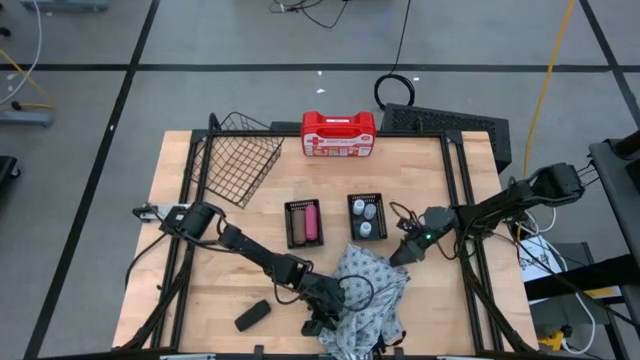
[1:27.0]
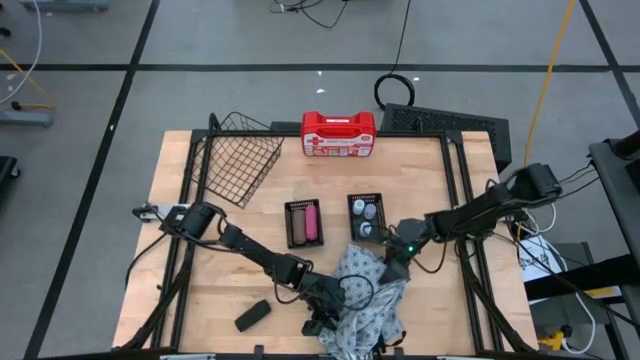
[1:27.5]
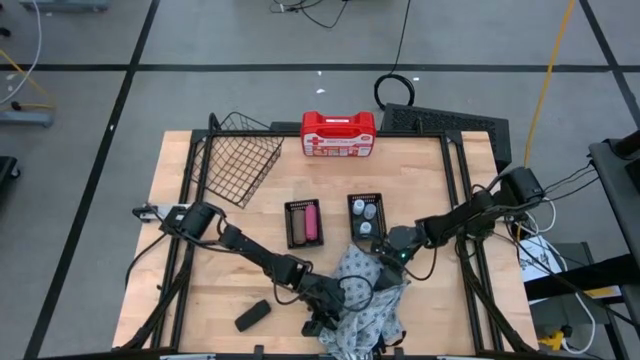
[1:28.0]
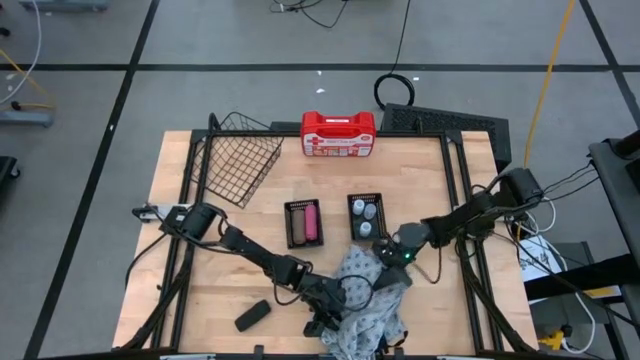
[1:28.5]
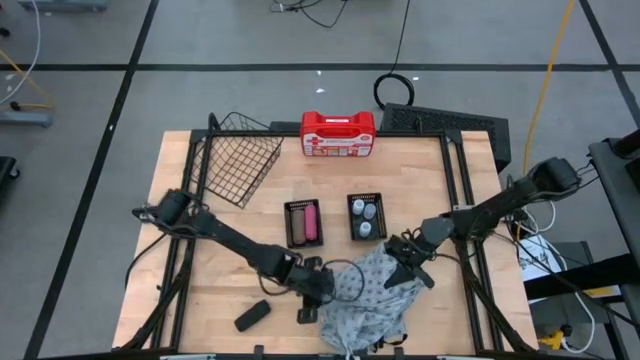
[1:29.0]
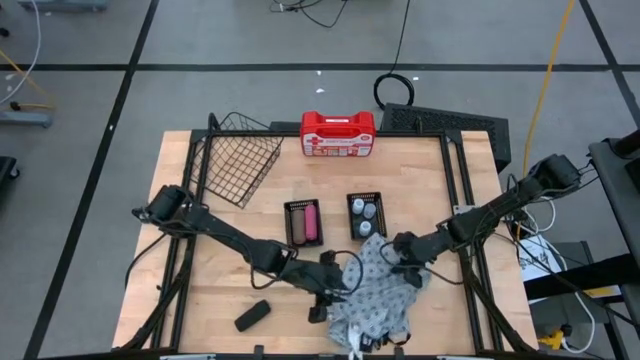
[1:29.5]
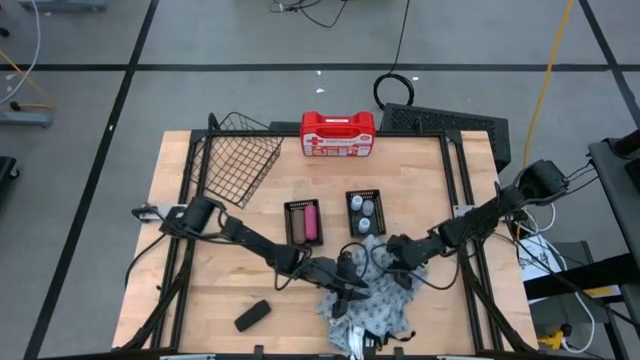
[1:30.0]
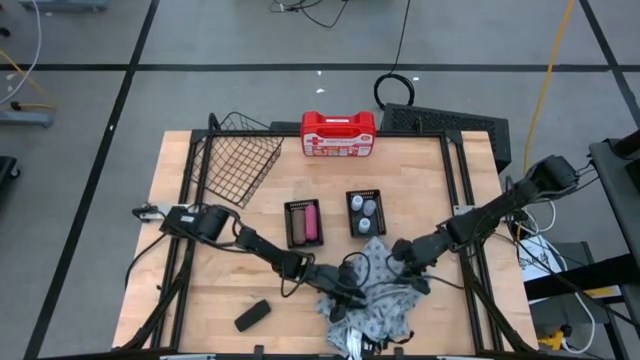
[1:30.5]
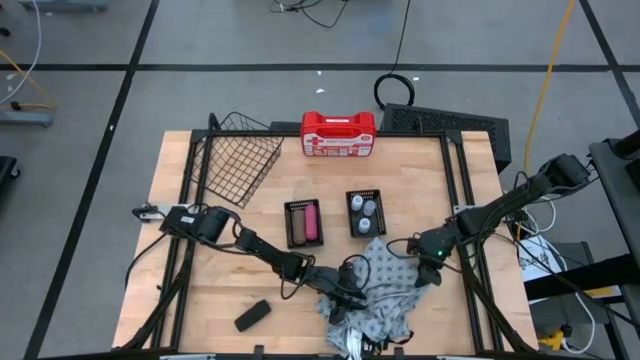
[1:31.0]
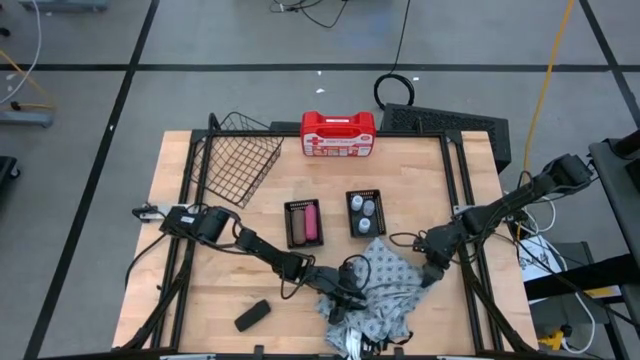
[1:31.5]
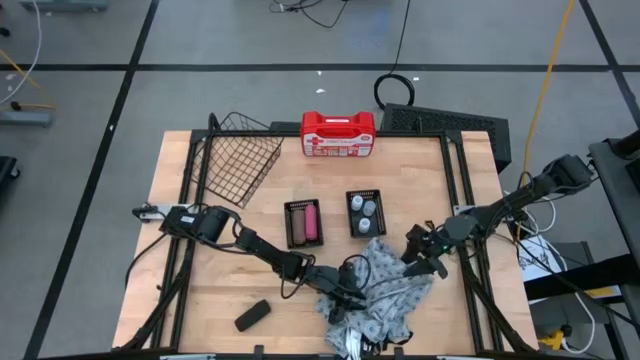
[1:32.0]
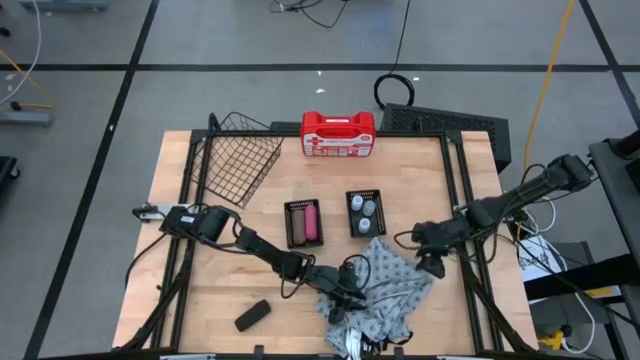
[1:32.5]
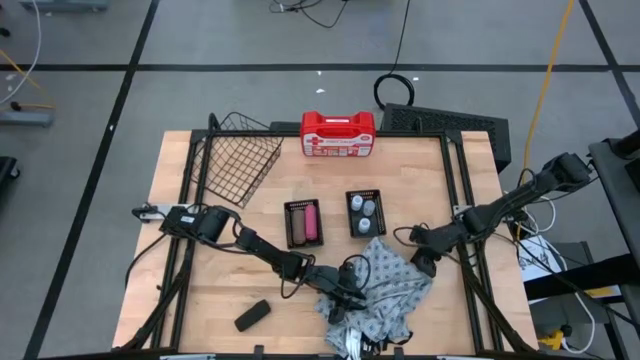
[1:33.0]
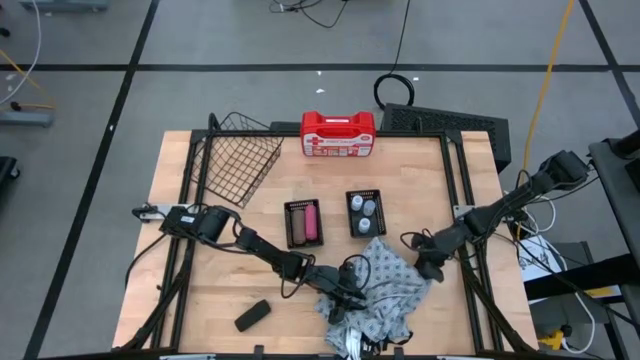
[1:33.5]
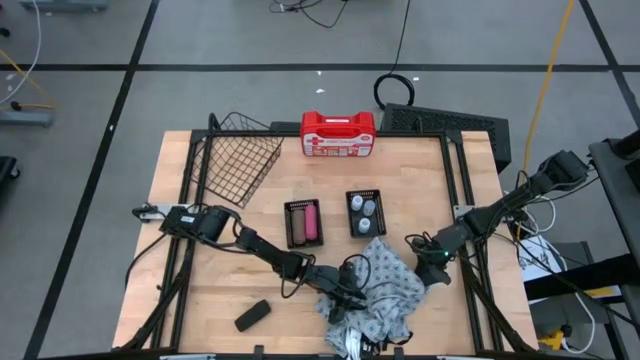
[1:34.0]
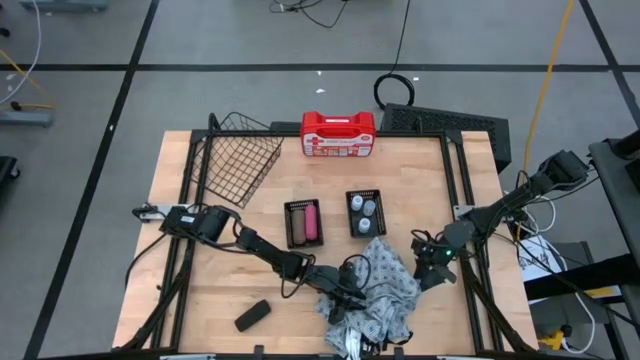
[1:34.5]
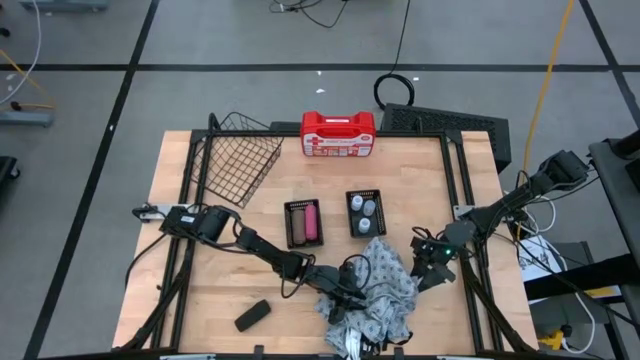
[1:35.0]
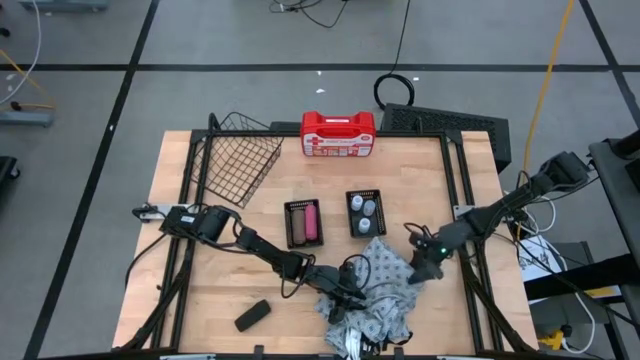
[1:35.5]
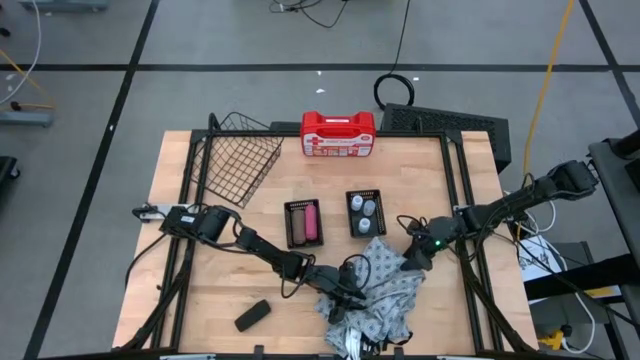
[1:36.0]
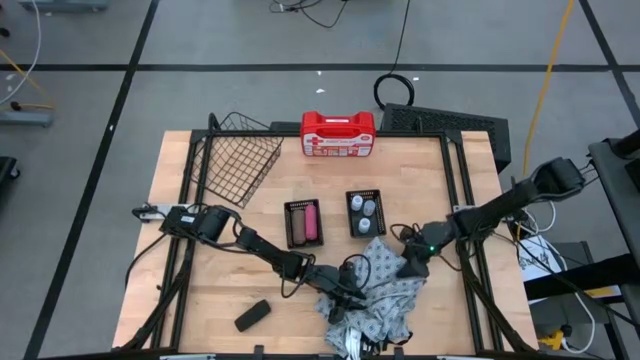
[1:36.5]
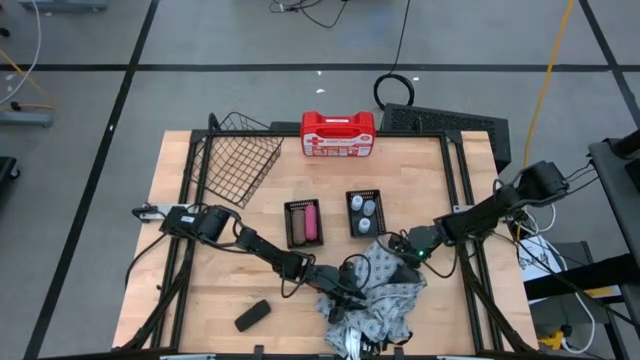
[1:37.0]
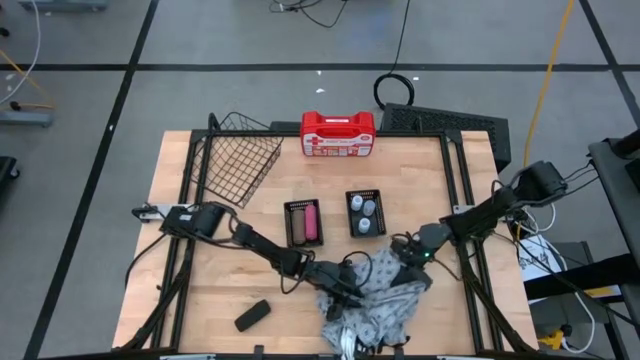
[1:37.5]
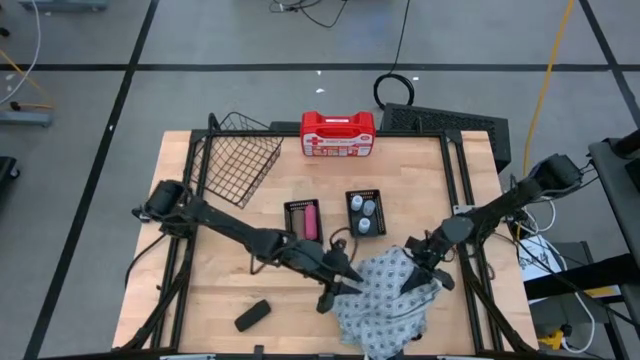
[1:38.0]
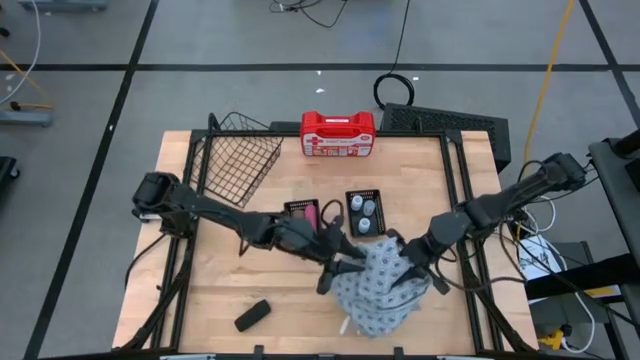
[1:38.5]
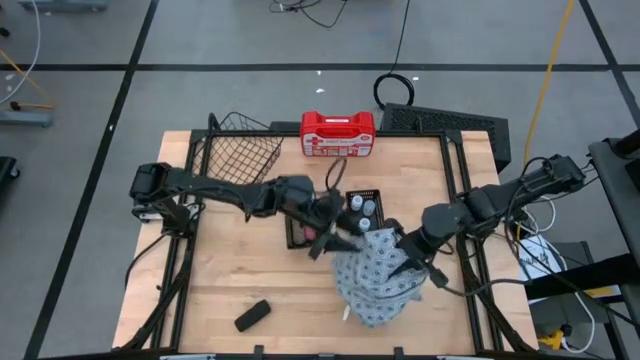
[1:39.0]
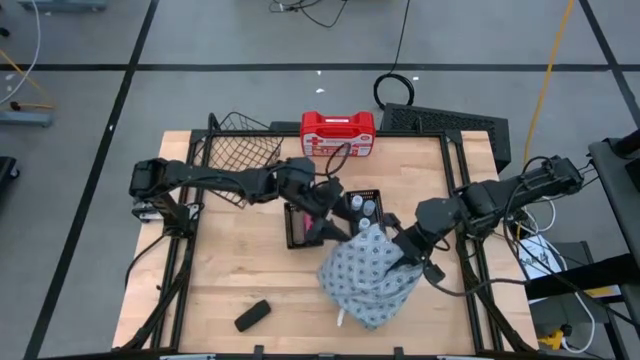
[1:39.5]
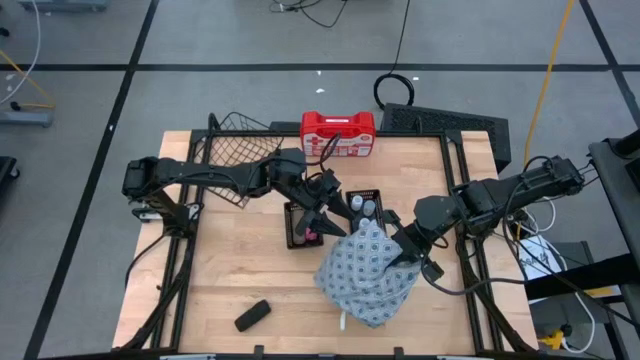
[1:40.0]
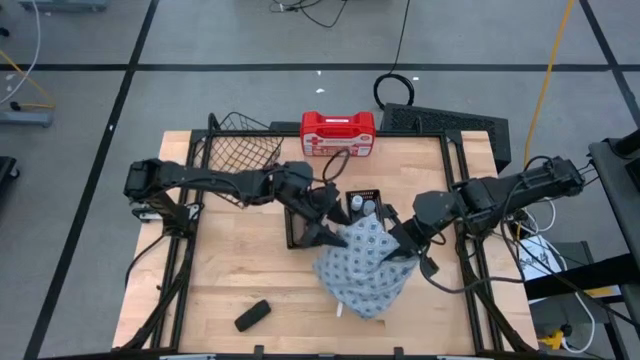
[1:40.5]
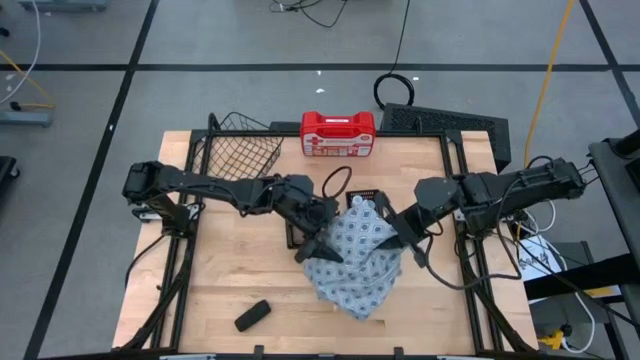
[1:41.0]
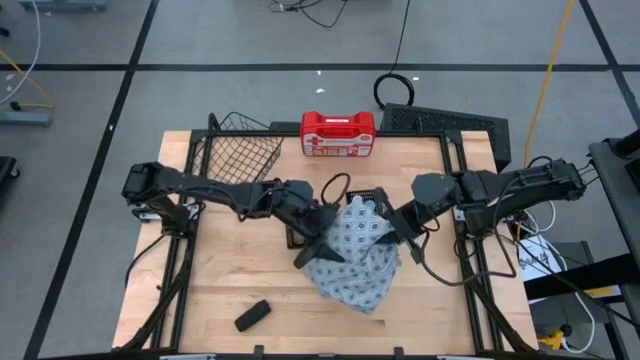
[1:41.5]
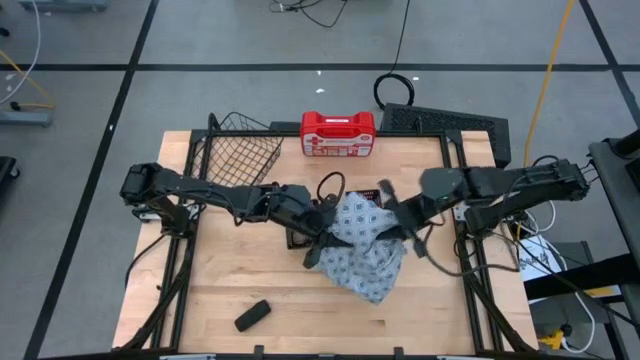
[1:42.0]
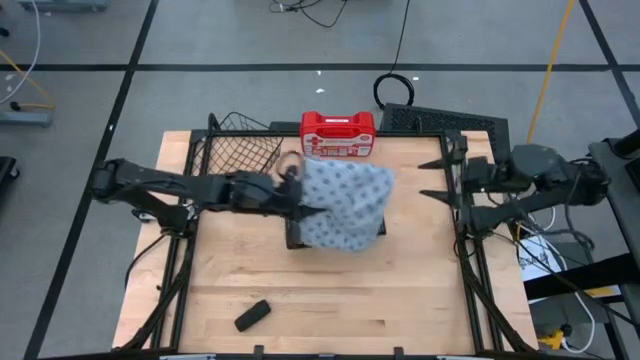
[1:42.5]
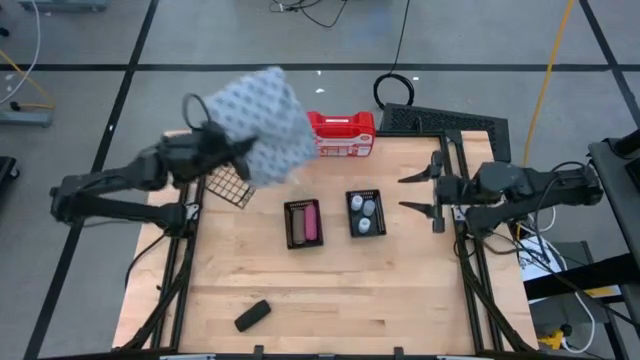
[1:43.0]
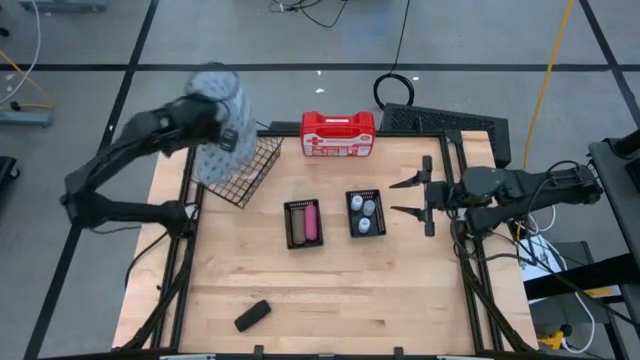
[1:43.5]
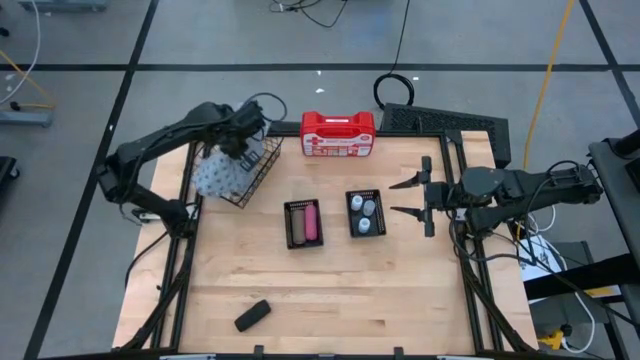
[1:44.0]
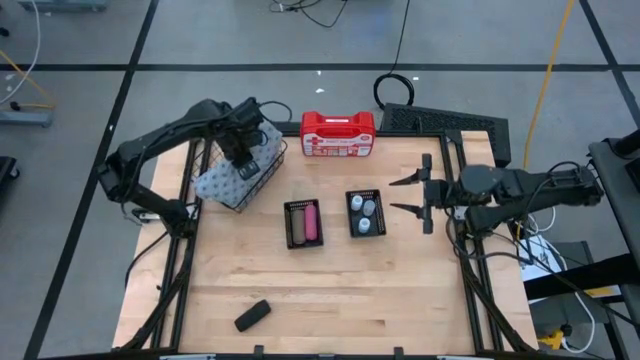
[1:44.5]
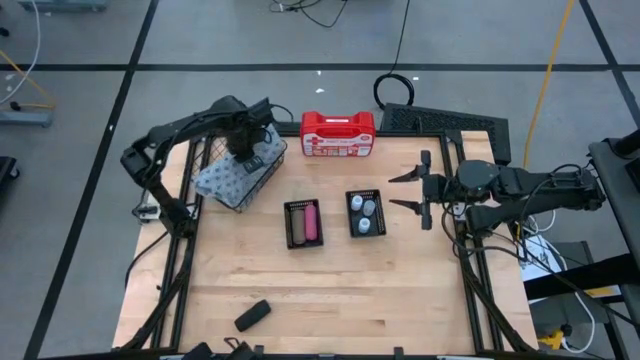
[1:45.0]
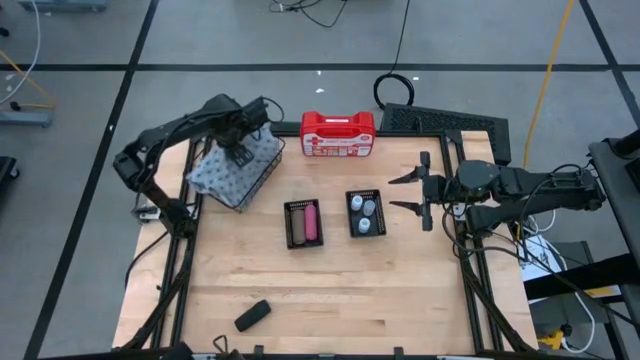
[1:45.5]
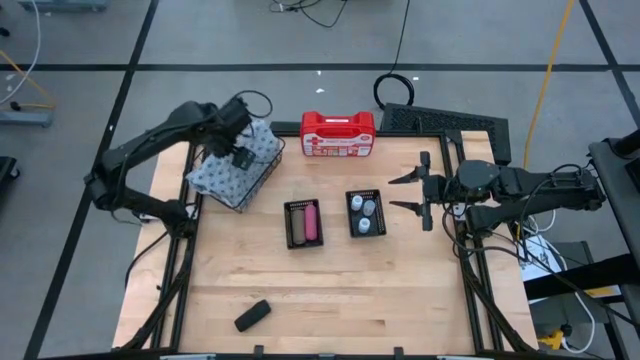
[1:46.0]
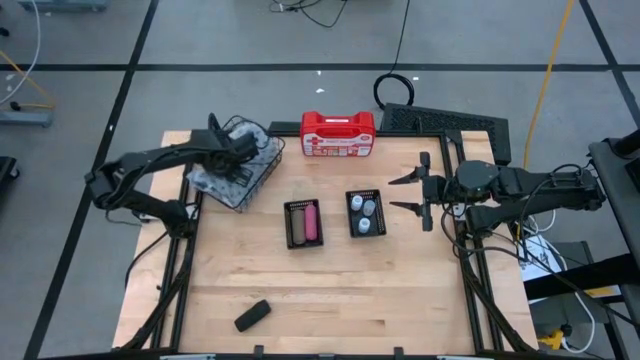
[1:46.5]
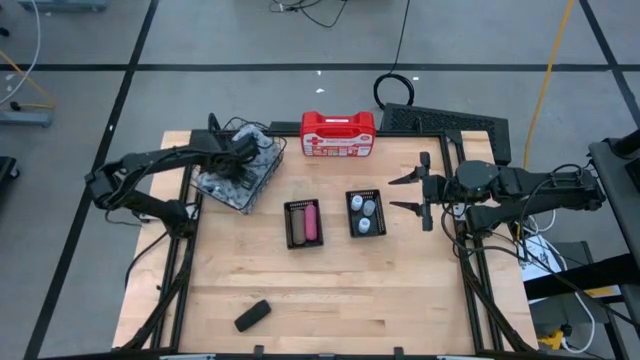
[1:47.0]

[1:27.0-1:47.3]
Task: Pick & Place Medicine items
Put the blue patient gown into the wire basket

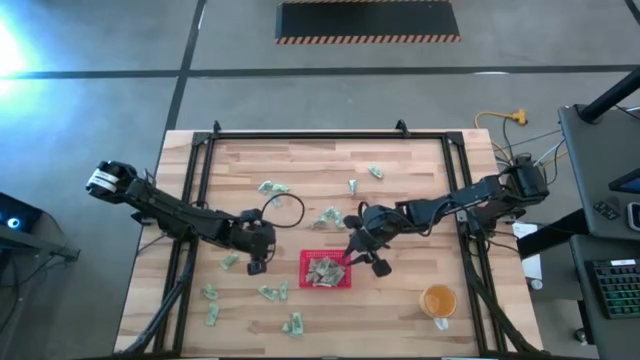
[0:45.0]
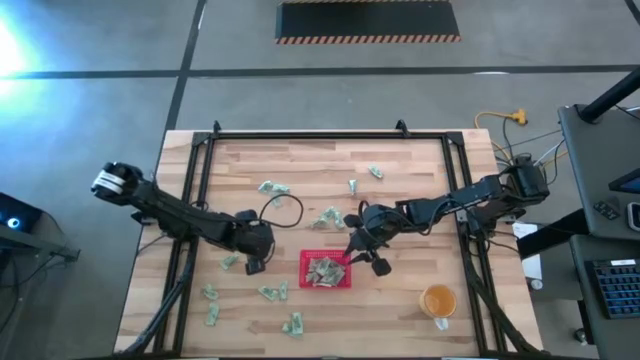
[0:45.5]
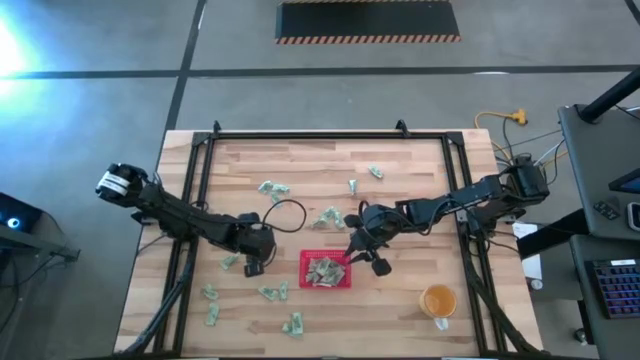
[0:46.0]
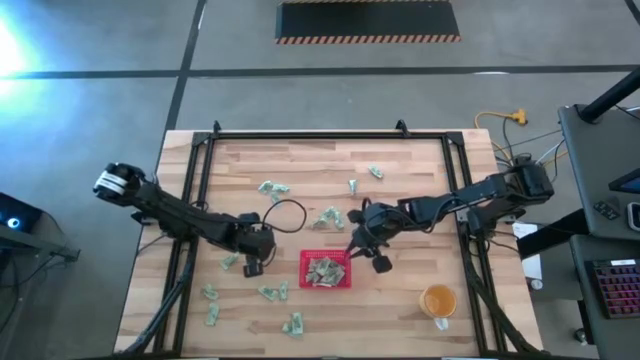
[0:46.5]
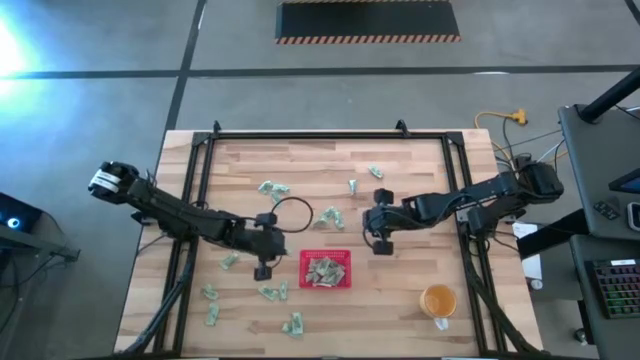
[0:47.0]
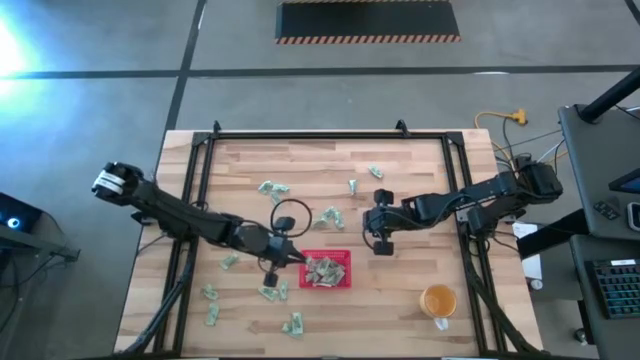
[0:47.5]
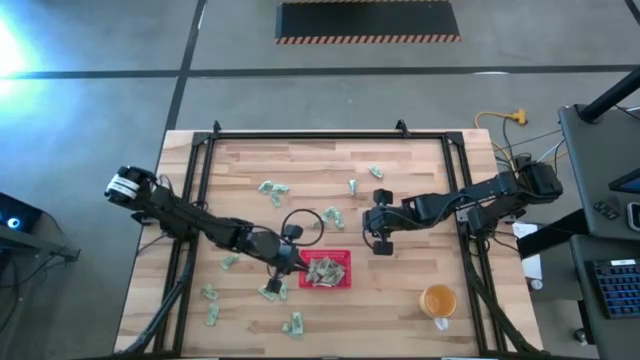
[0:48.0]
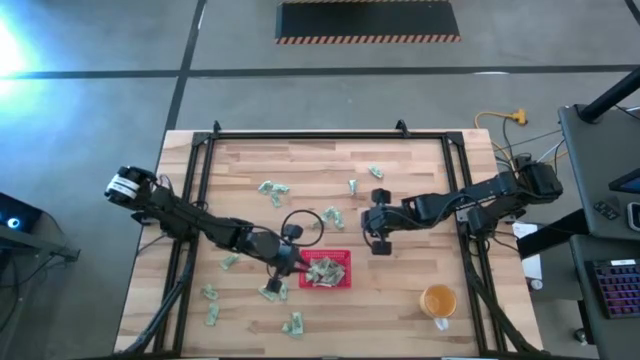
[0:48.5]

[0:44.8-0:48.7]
Task: Pick and place Stevia / Truvia into bins
Put the white stevia packet into the red bin
